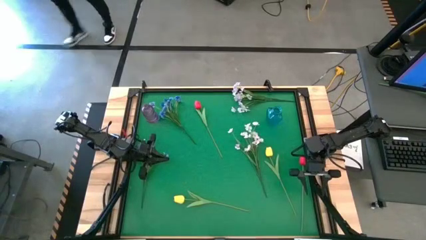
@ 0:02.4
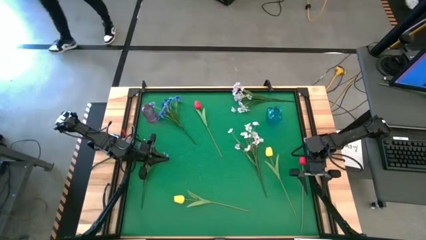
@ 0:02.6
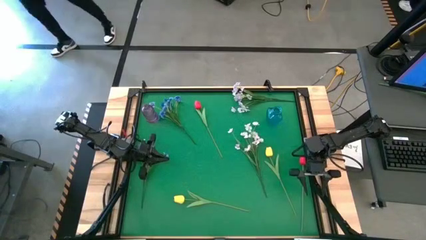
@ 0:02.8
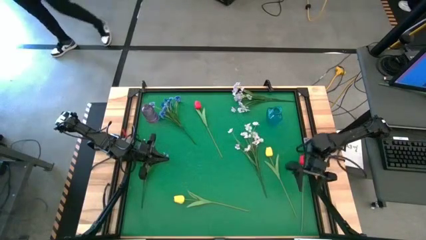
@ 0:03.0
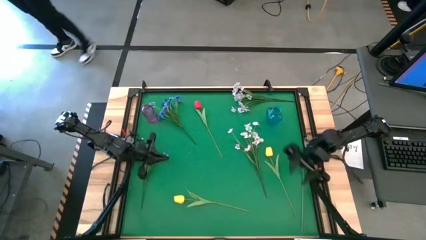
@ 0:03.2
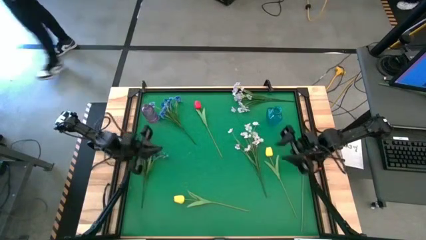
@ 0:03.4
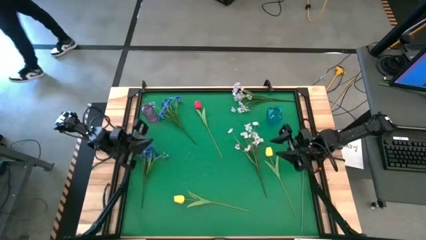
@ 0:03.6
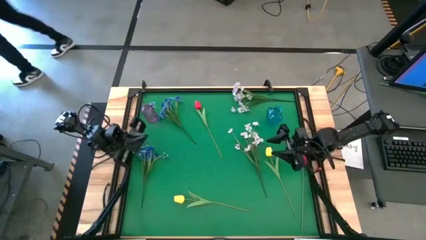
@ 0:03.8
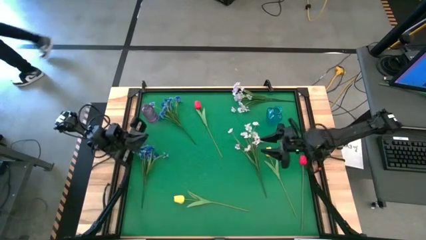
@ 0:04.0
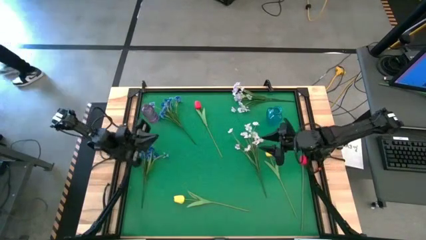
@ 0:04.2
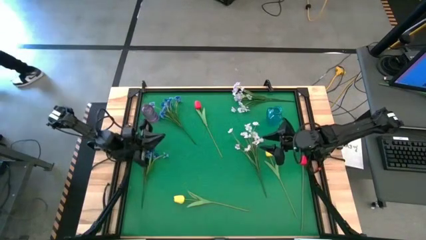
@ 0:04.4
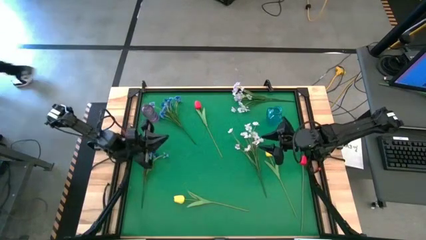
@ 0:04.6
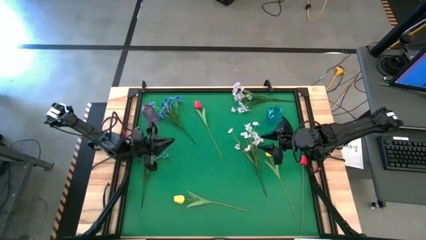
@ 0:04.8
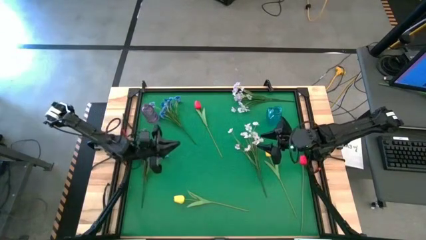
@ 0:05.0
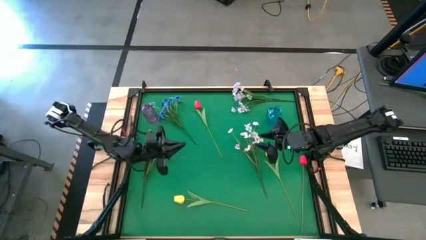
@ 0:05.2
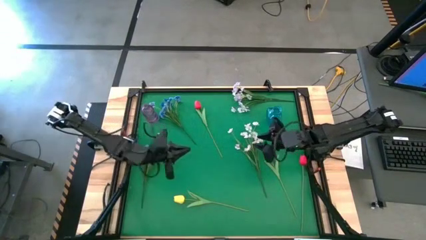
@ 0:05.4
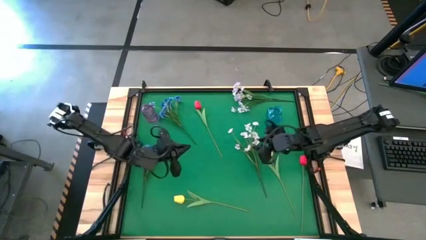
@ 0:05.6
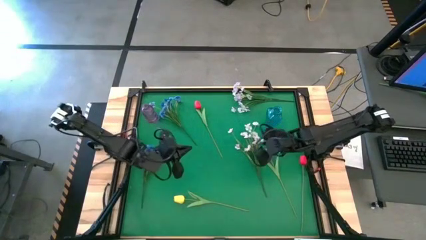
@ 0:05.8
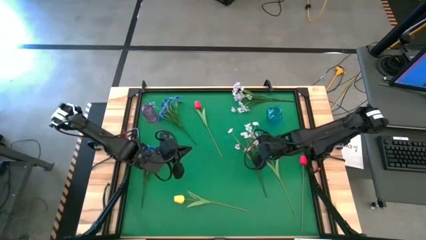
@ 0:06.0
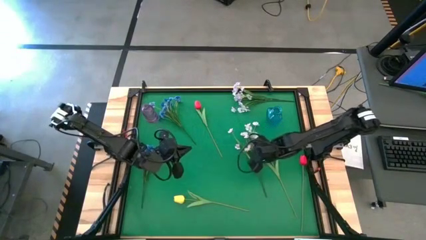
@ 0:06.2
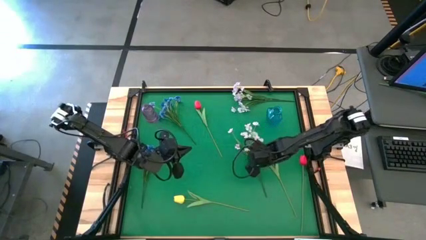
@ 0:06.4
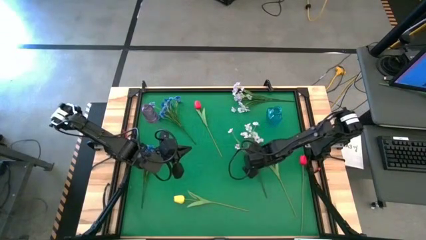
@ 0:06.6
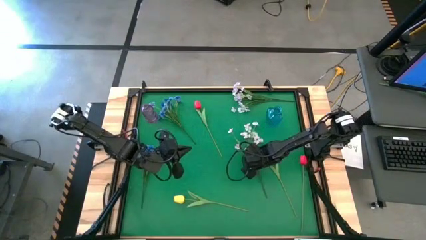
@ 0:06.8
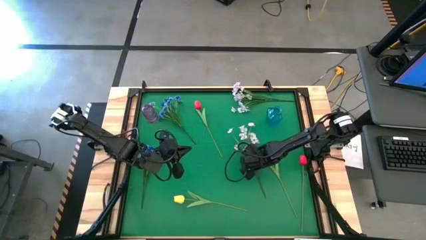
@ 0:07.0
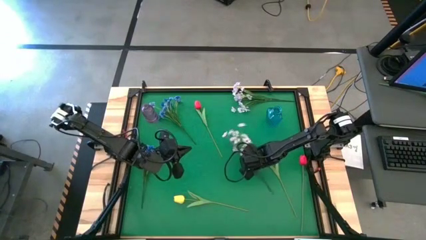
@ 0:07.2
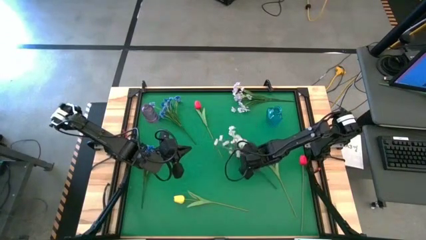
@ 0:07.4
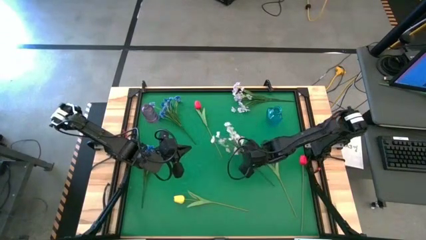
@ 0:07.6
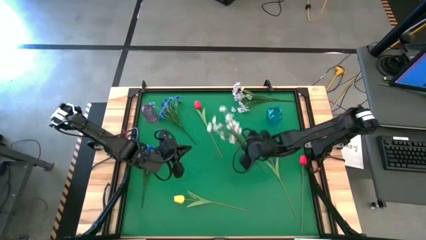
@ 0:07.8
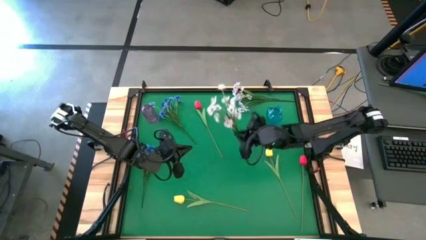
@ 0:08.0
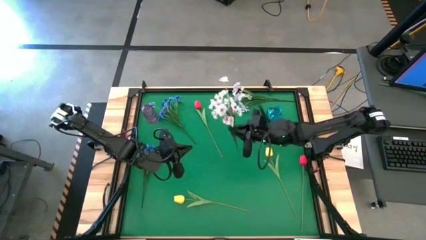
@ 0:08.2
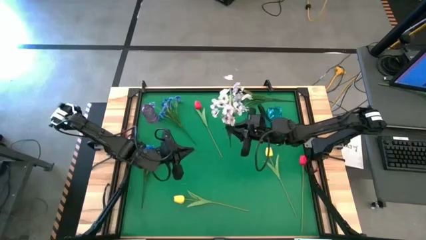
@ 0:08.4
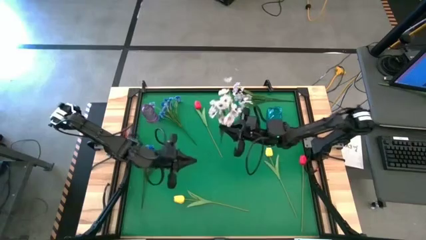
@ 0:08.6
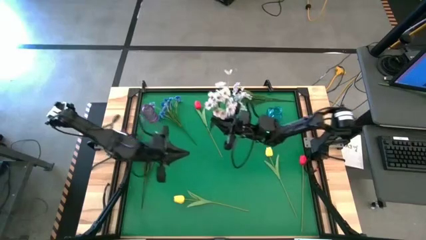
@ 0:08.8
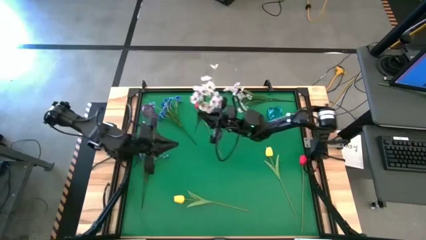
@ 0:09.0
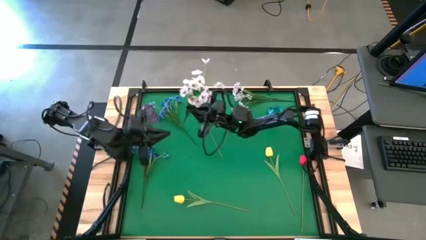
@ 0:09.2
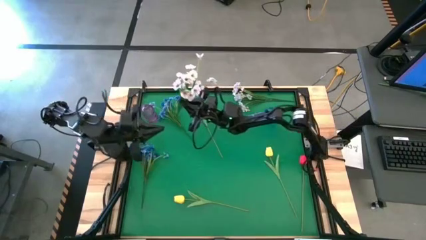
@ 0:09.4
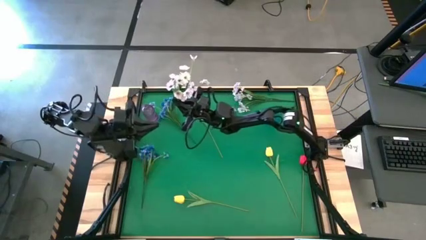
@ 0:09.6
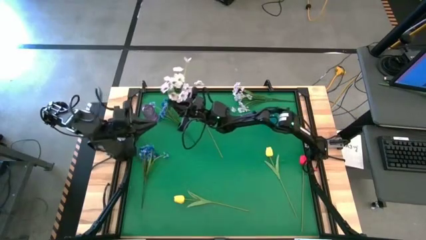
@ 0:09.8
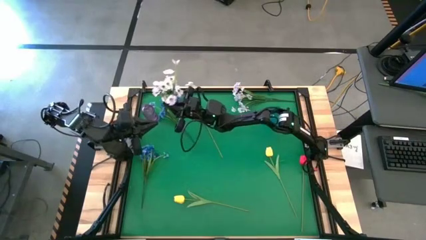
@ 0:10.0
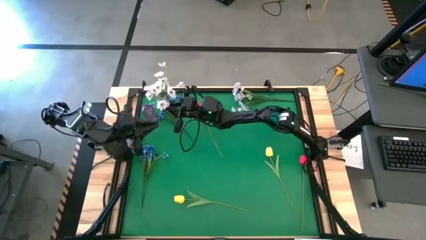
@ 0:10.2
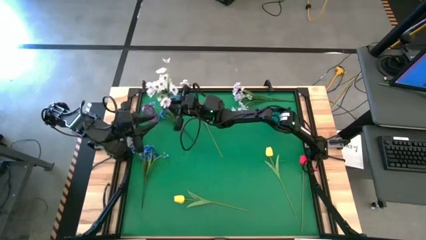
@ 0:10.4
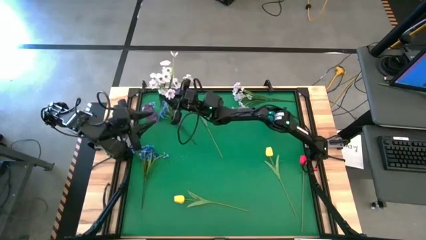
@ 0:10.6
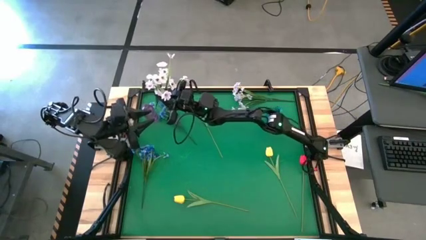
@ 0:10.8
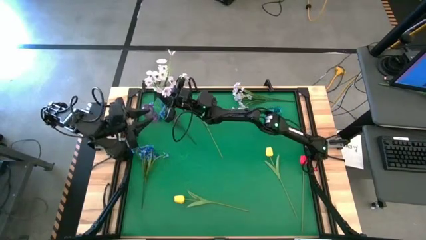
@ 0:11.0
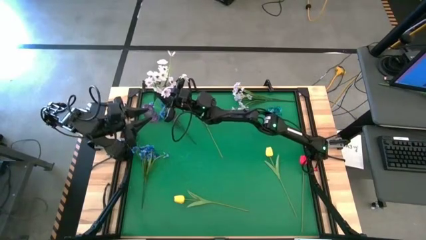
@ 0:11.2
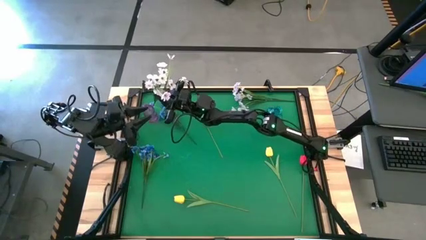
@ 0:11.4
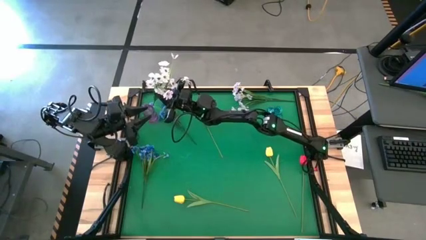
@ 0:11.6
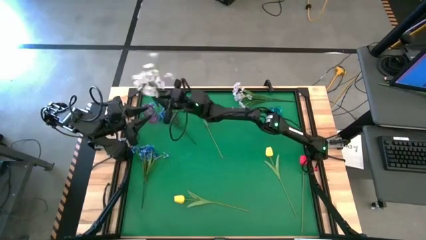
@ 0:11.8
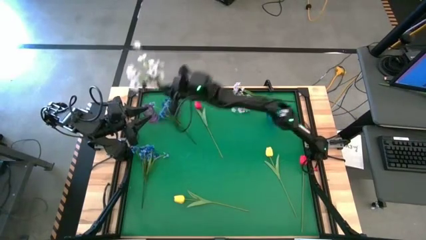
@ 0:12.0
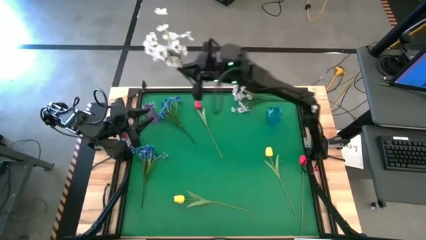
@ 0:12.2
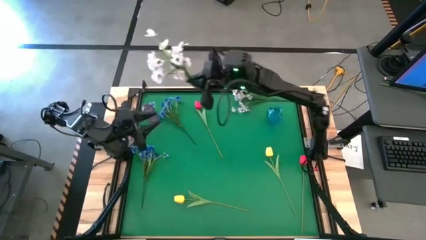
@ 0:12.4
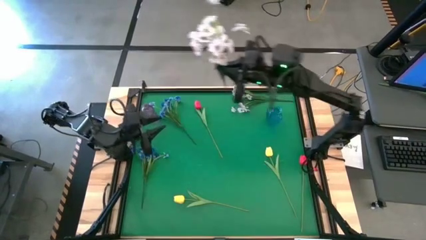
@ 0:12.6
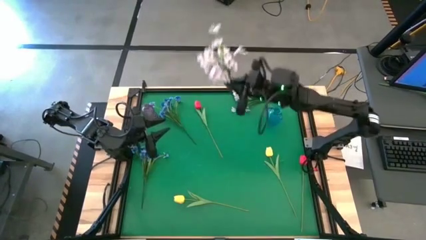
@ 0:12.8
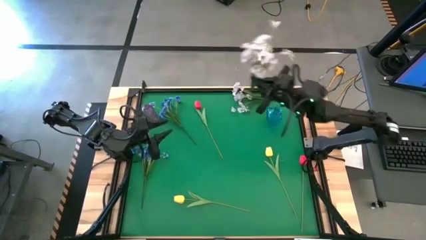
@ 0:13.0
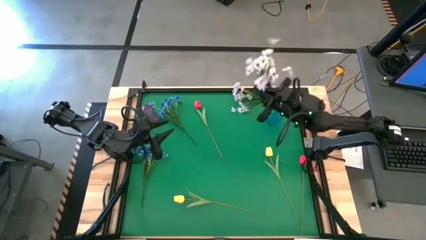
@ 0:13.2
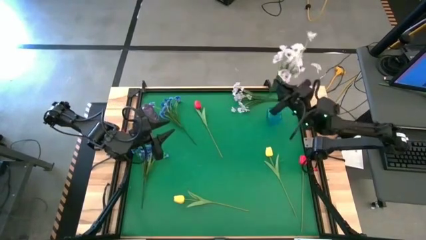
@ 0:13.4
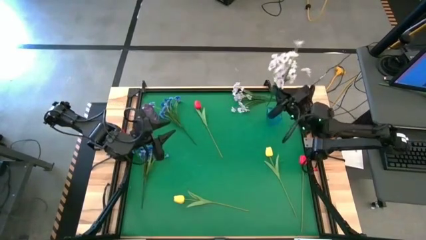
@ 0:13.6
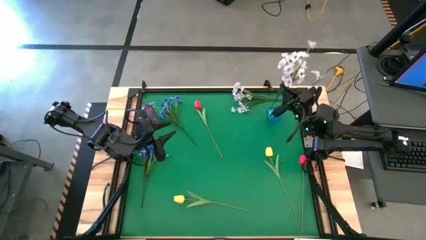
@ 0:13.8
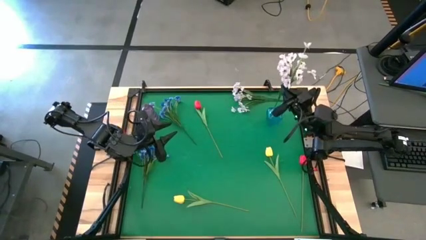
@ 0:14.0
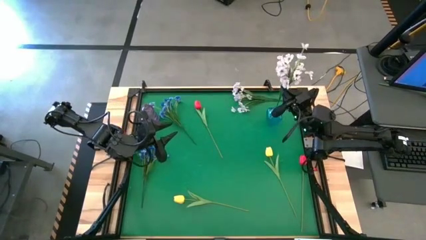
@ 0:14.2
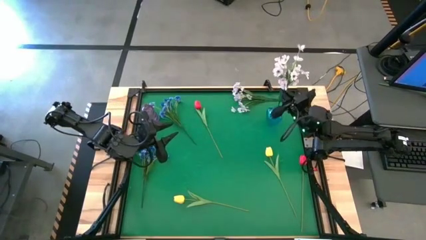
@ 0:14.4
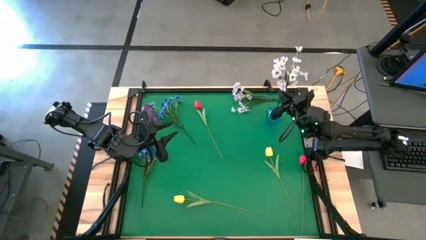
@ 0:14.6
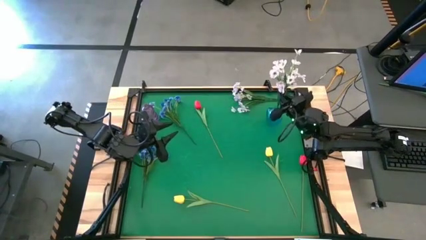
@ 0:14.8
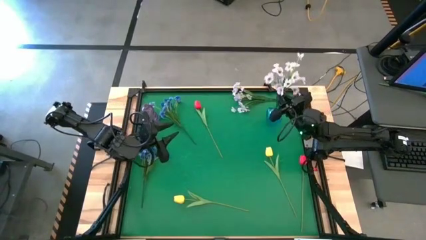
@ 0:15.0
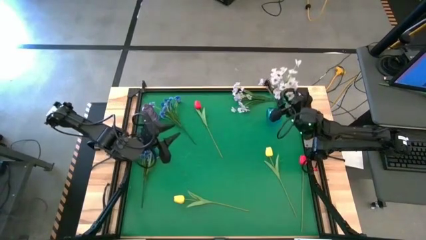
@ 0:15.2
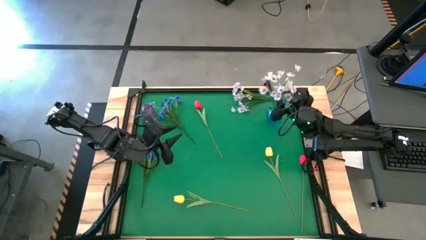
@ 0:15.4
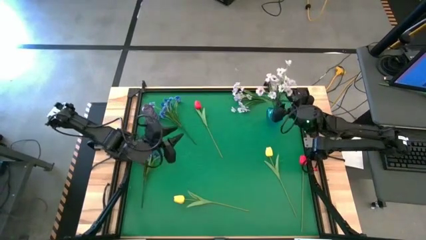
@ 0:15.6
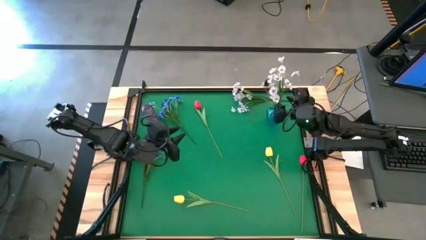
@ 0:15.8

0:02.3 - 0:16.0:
Task: Sort flowers into vase by color
Put the bottom white flowers into the blue vase
